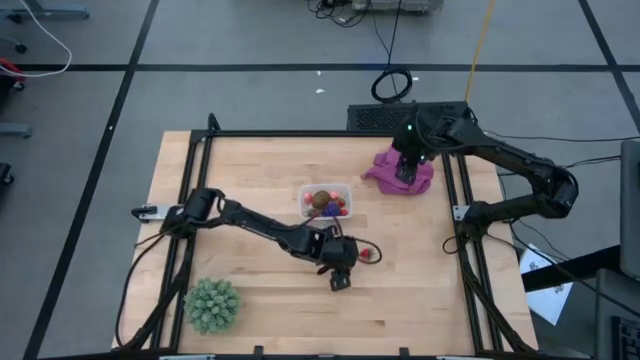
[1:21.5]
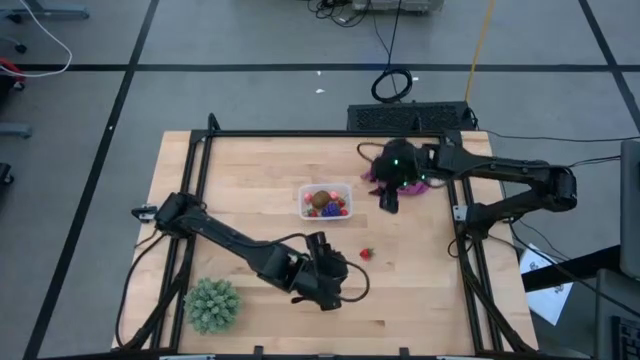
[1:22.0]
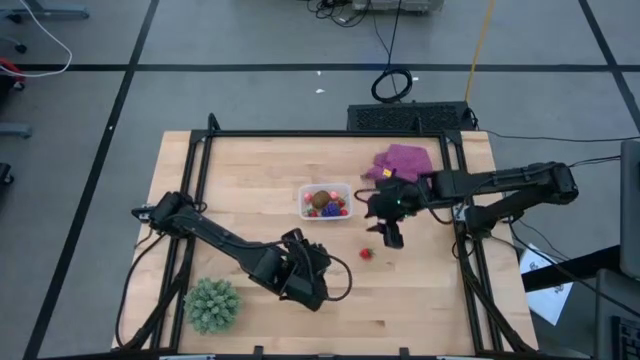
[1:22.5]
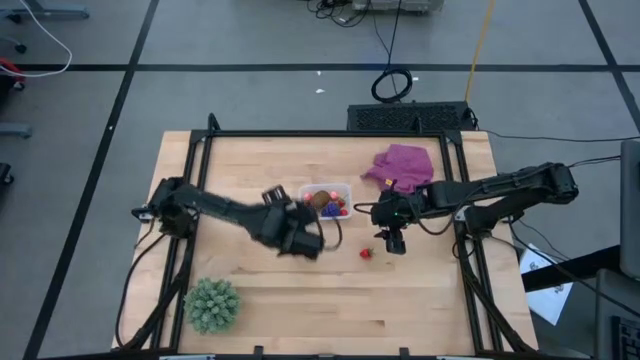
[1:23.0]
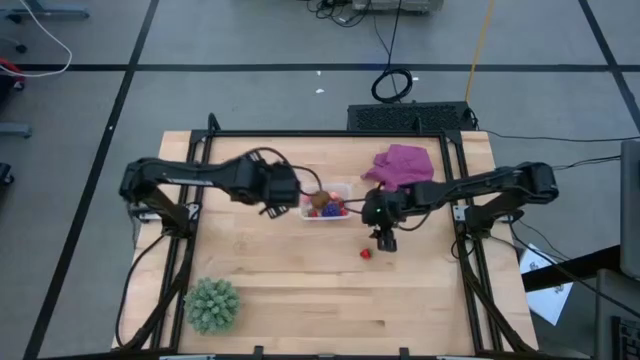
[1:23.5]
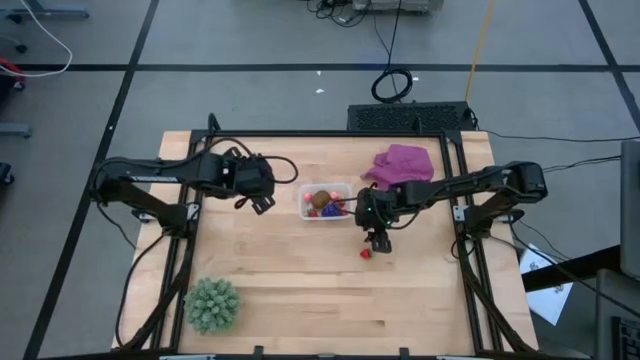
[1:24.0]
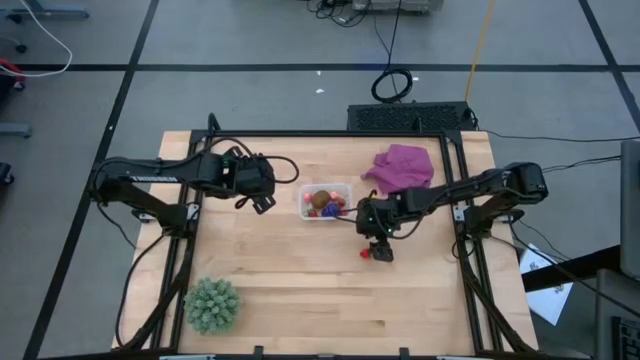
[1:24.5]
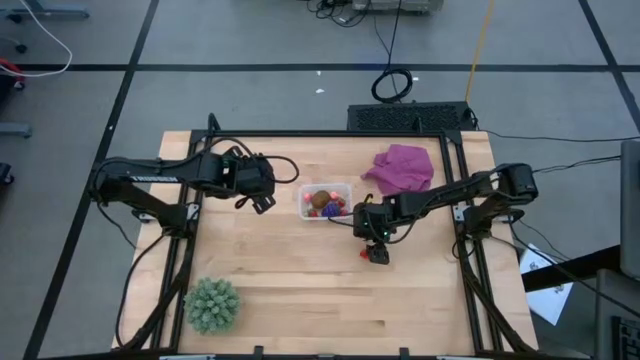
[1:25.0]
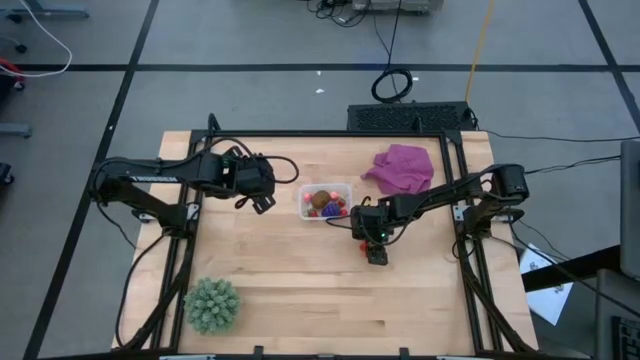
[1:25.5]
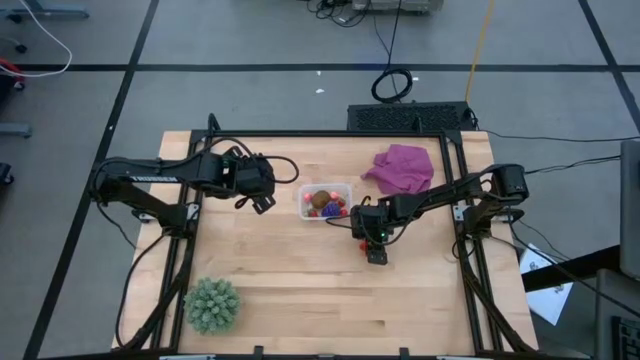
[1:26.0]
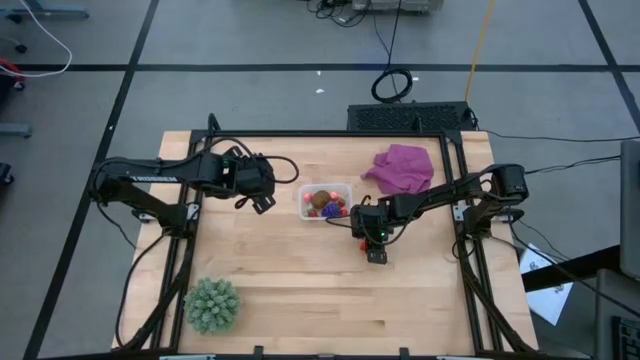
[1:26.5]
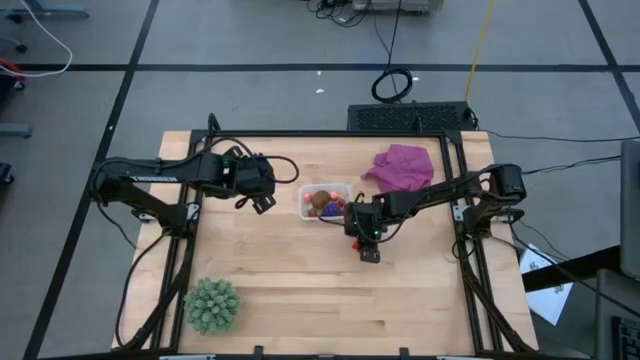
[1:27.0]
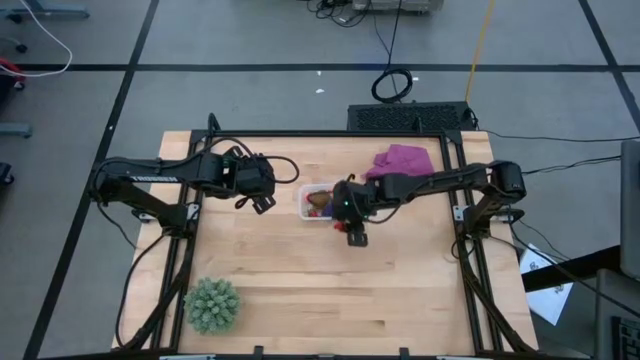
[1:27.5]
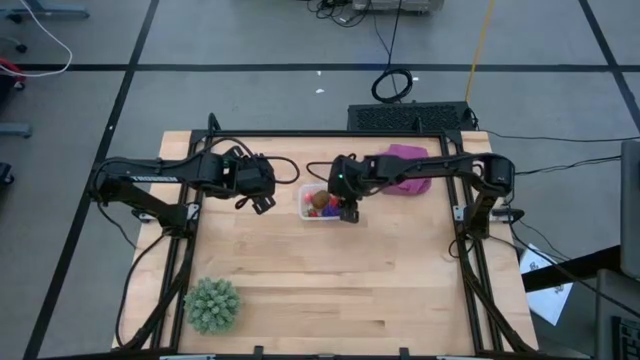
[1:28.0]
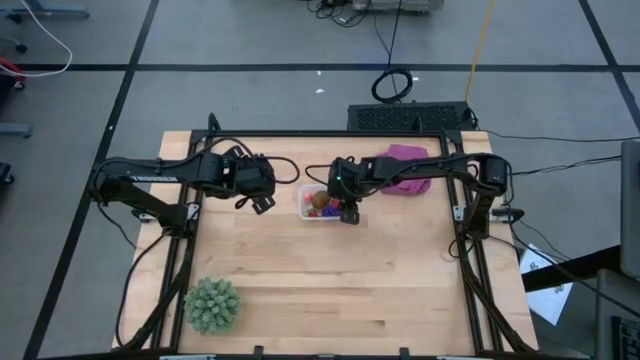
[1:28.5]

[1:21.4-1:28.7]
Task: Pick and placing Produce into tupperware
Put the strawberry into the transparent bin

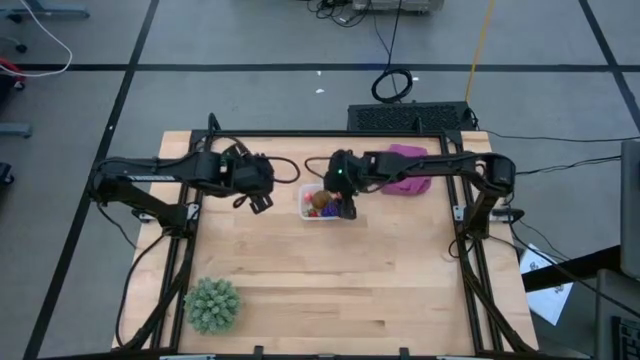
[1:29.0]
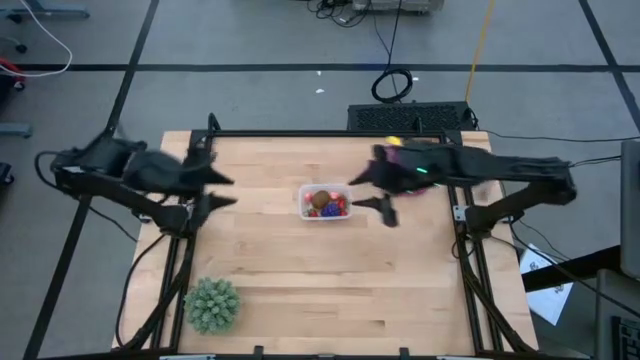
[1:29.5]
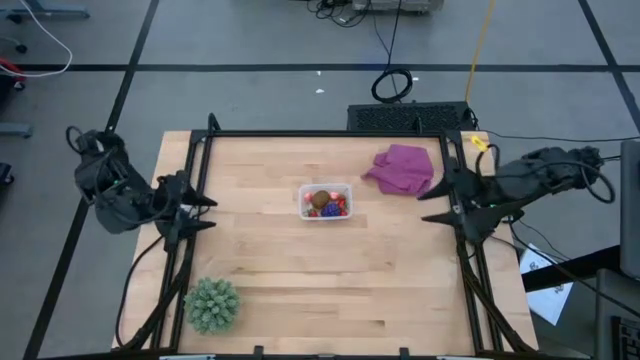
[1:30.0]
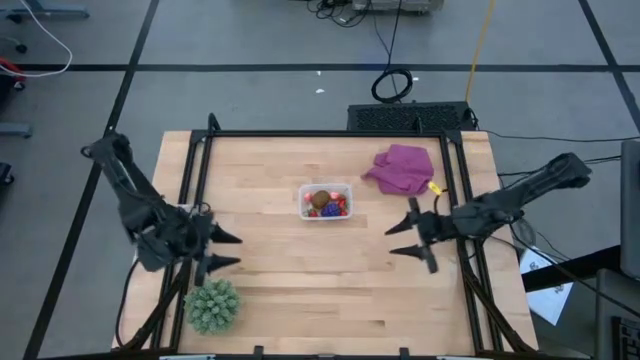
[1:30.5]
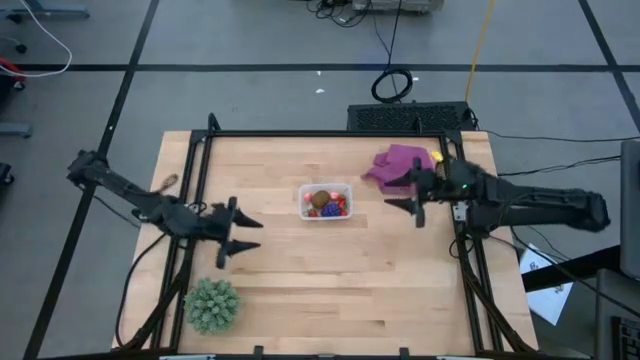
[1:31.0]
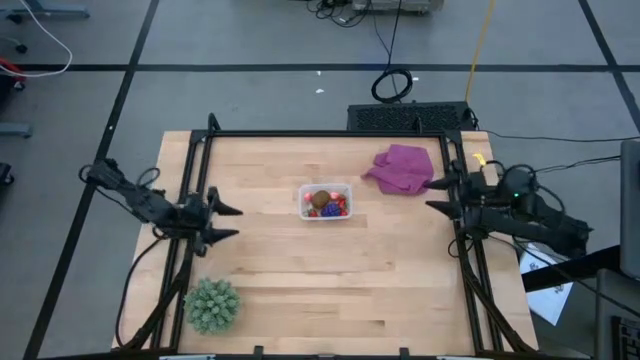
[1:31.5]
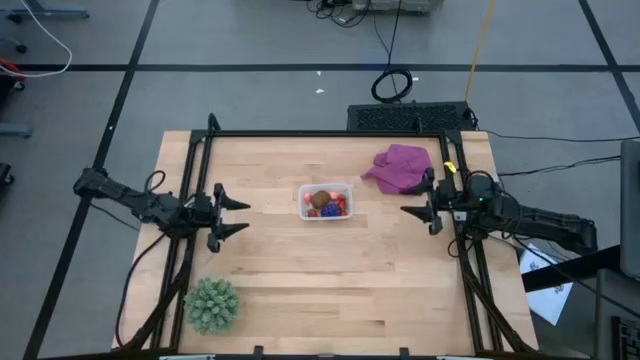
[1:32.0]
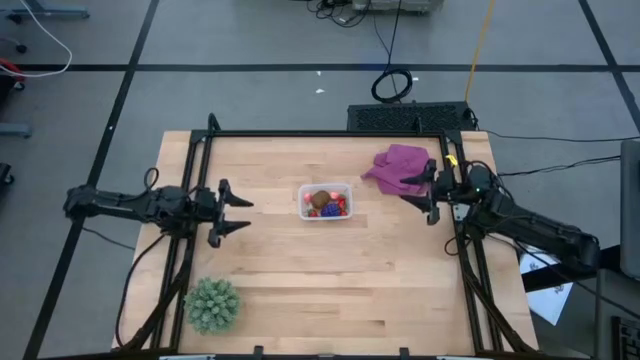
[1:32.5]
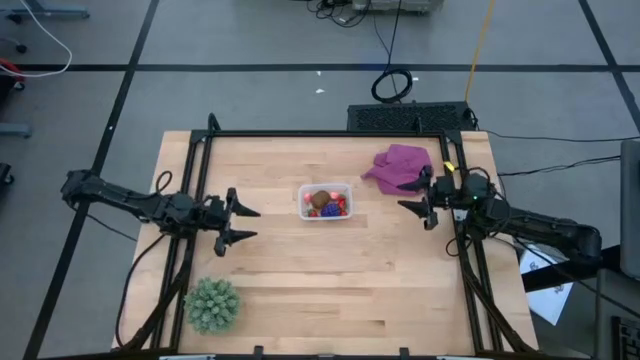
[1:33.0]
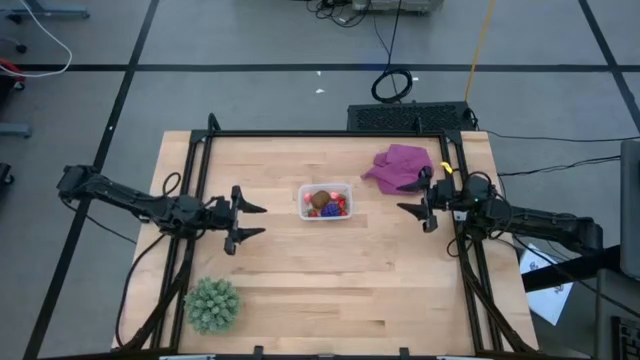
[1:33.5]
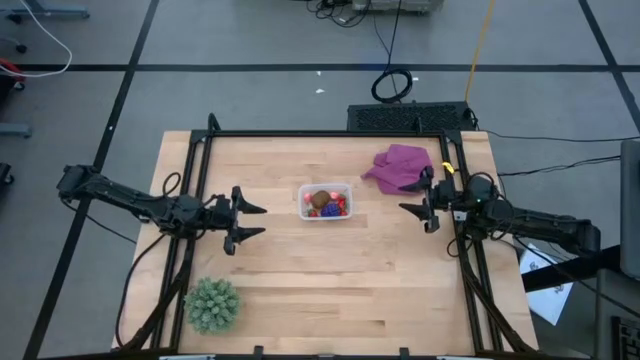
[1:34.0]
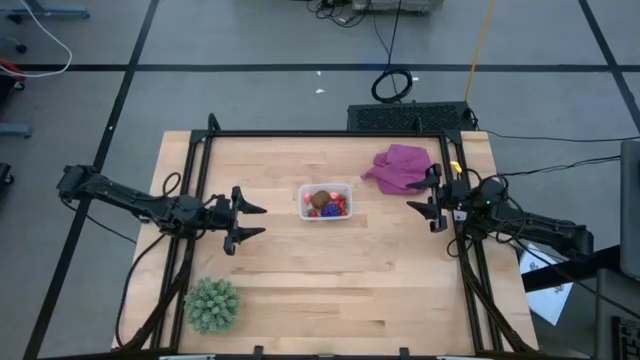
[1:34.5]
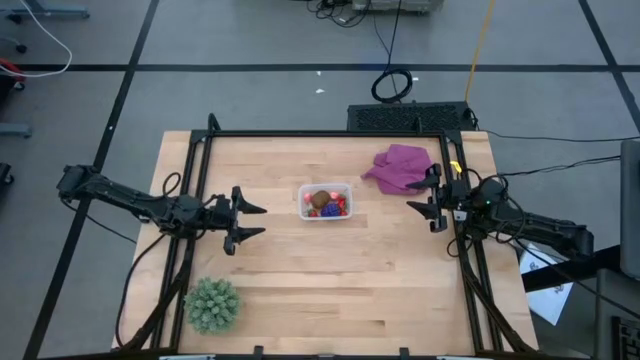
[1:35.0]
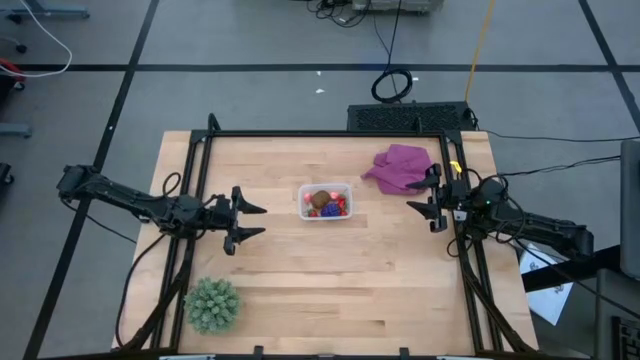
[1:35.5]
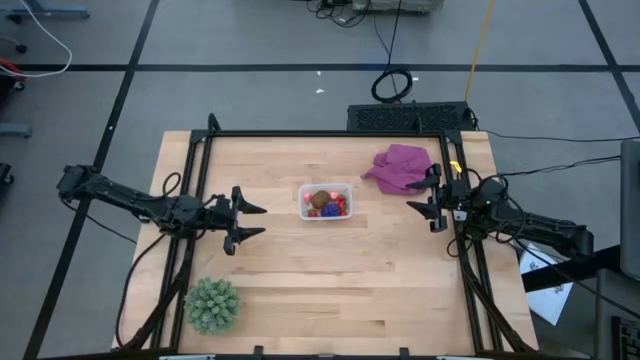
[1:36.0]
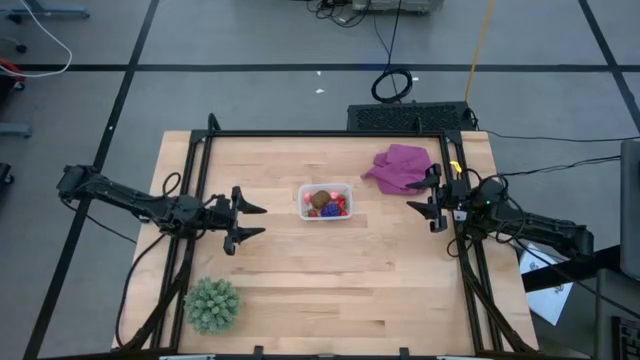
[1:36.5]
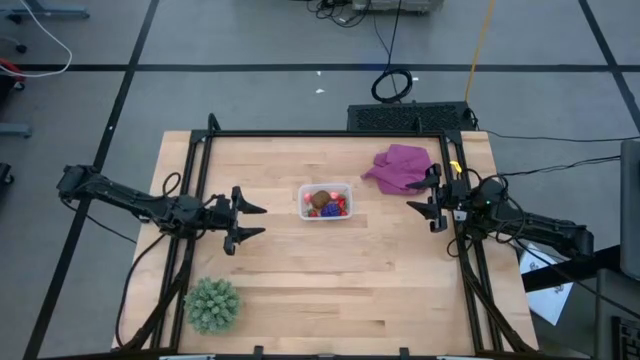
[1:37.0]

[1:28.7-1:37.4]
Return to Home Position

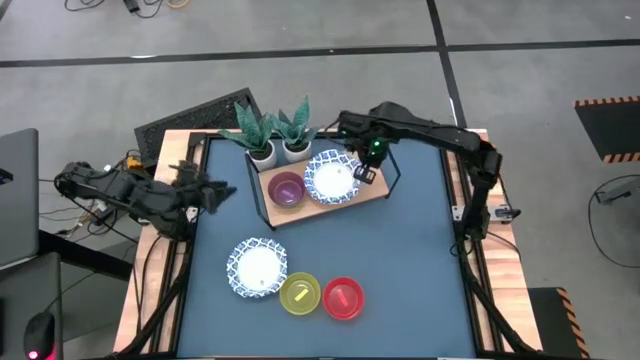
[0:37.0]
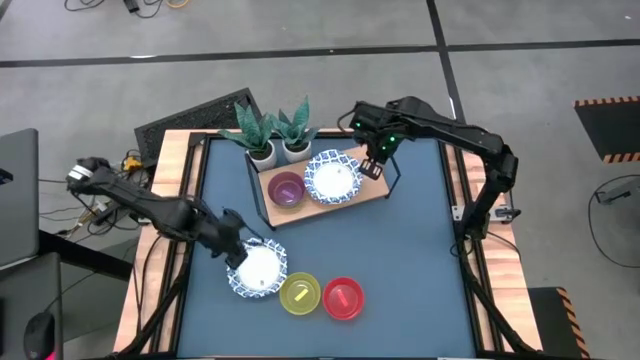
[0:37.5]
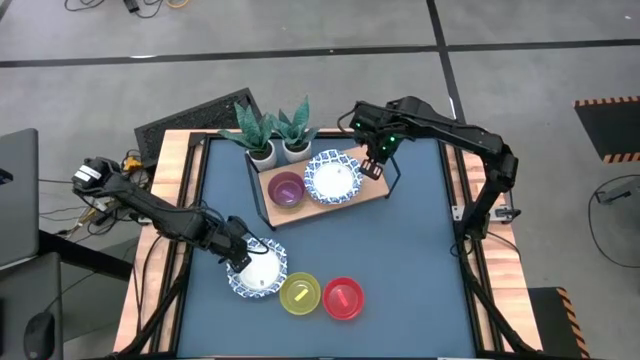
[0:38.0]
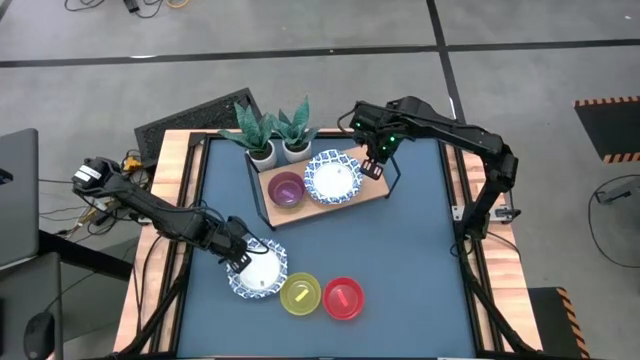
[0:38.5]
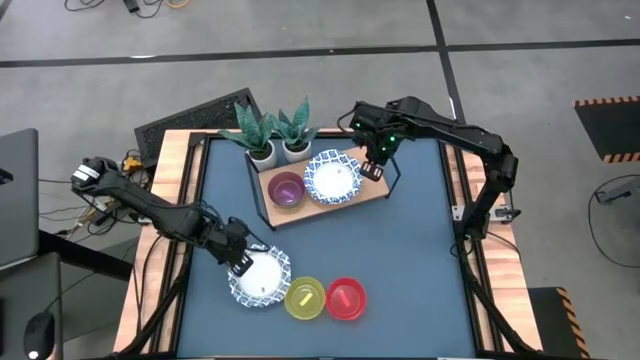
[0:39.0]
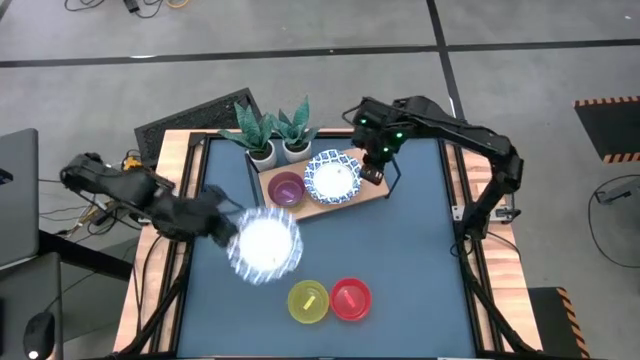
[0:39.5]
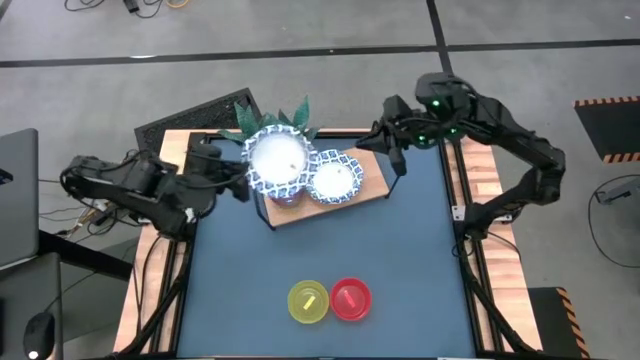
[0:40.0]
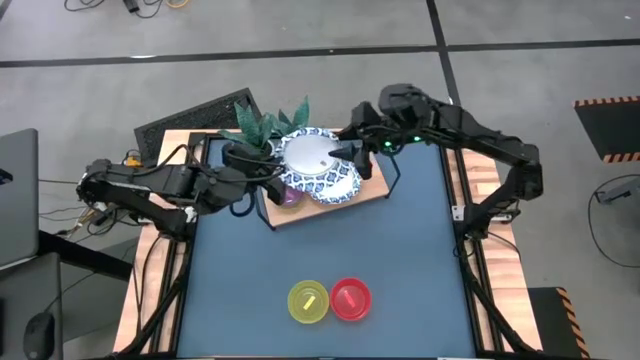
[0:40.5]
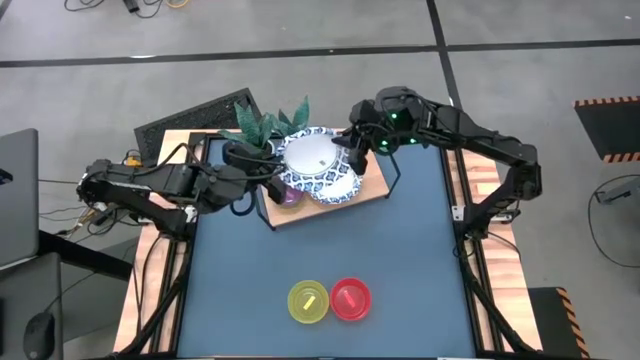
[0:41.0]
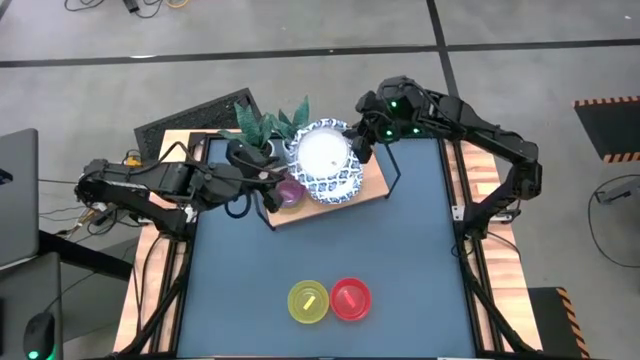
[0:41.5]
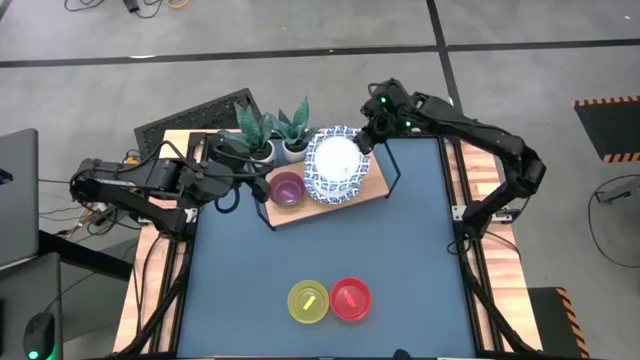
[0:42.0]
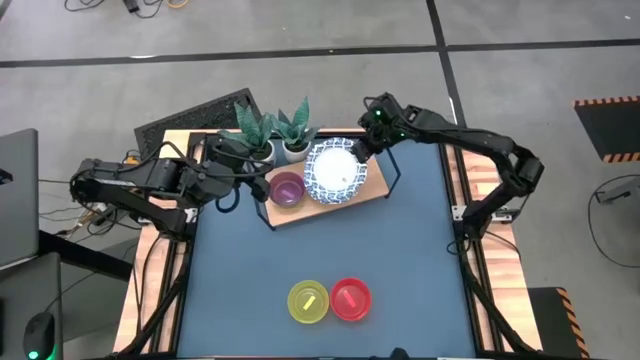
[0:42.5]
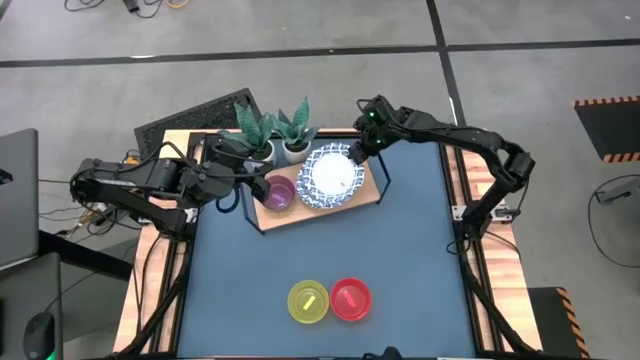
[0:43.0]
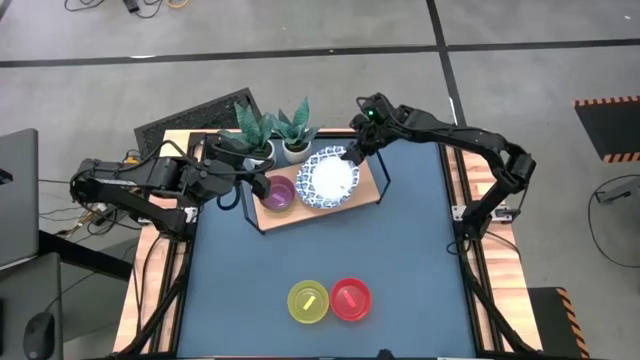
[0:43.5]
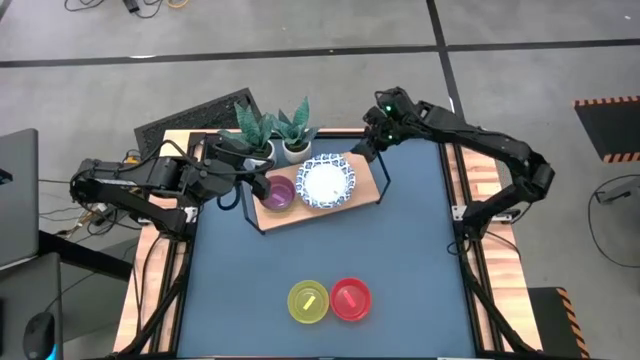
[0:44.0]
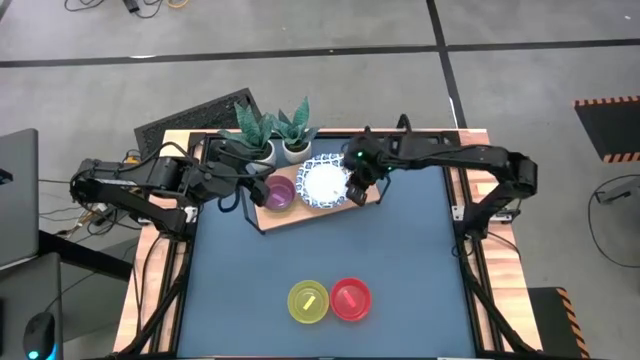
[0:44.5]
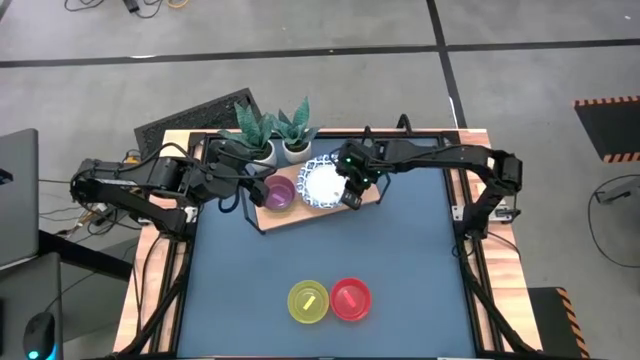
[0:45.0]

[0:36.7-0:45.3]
Task: Place and stack bowls onto a shelf
Stack the white patterned bowl on top of the white patterned bowl on the shelf
